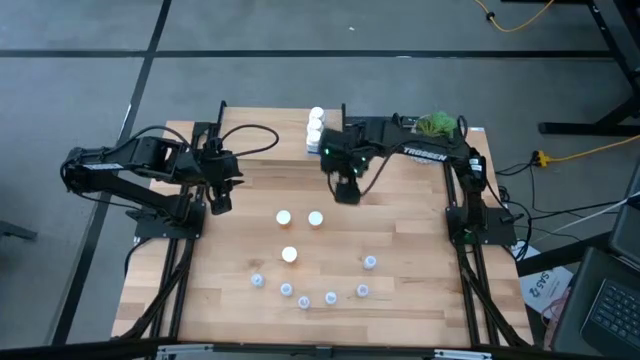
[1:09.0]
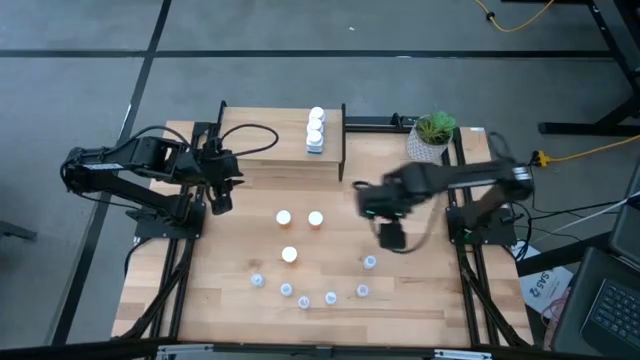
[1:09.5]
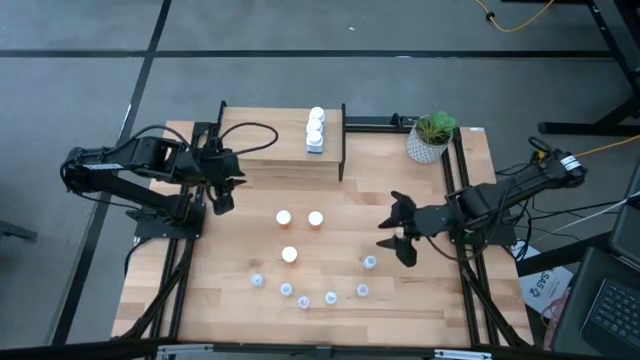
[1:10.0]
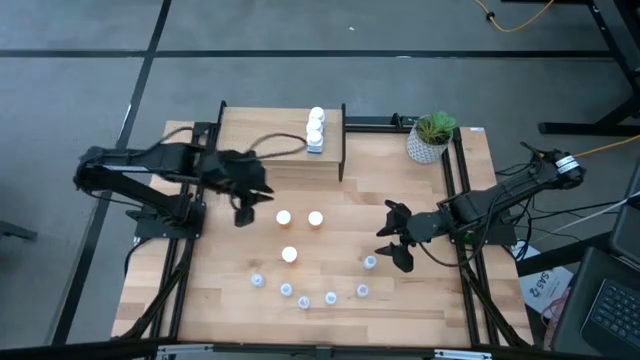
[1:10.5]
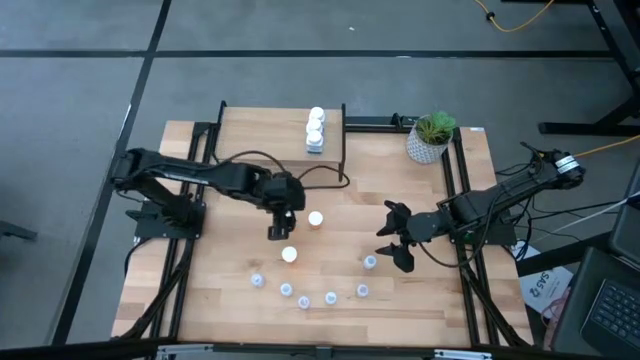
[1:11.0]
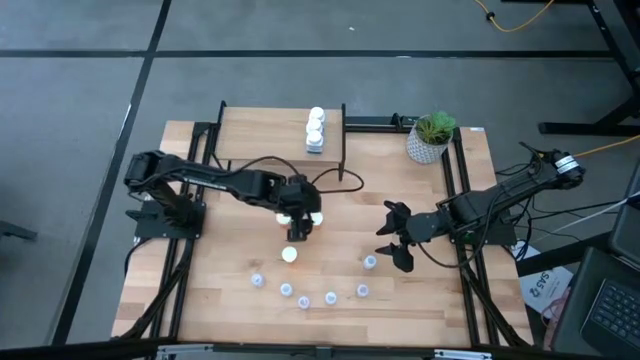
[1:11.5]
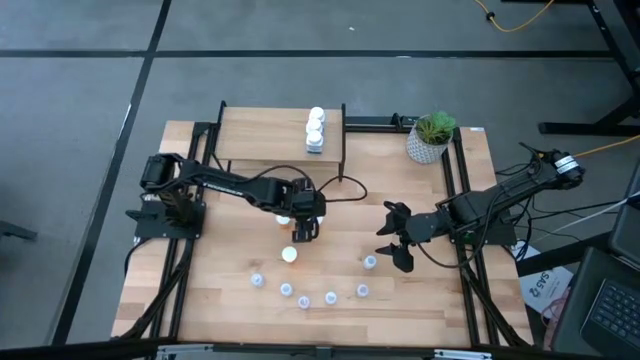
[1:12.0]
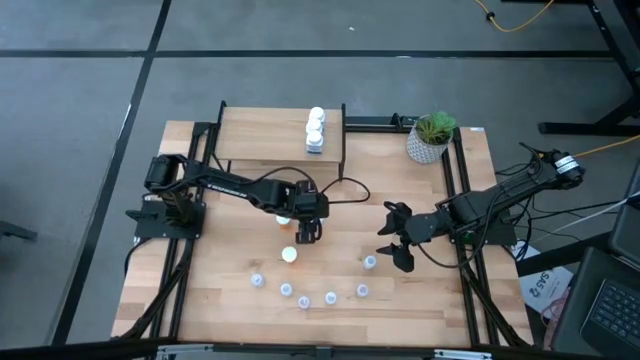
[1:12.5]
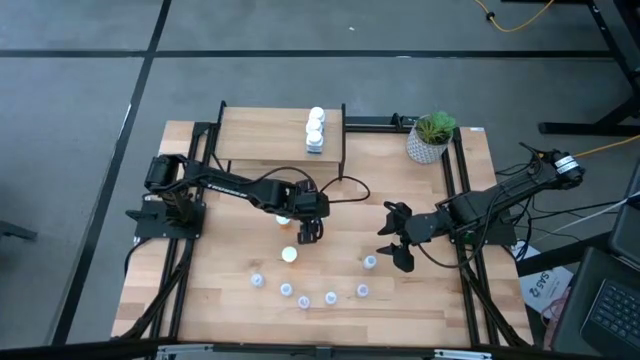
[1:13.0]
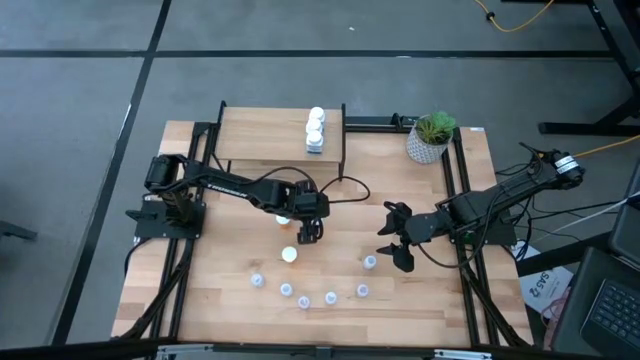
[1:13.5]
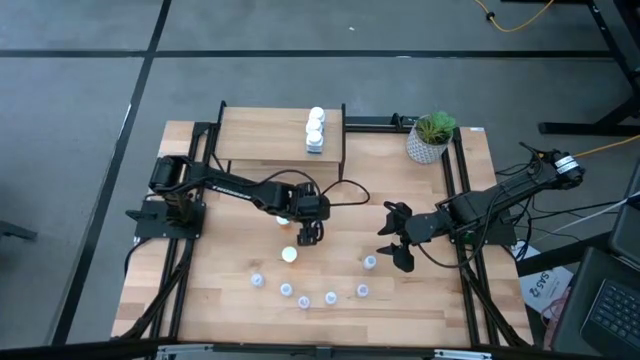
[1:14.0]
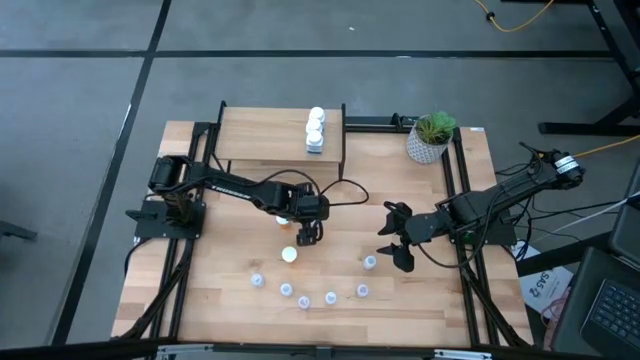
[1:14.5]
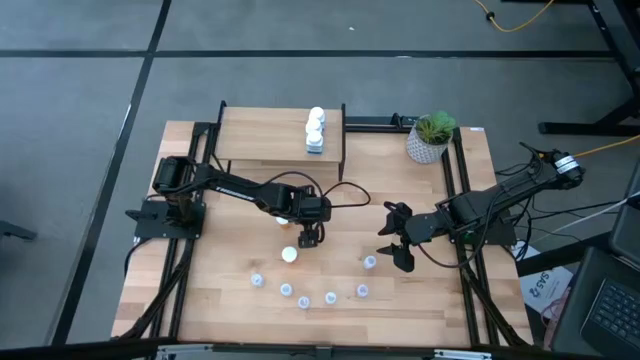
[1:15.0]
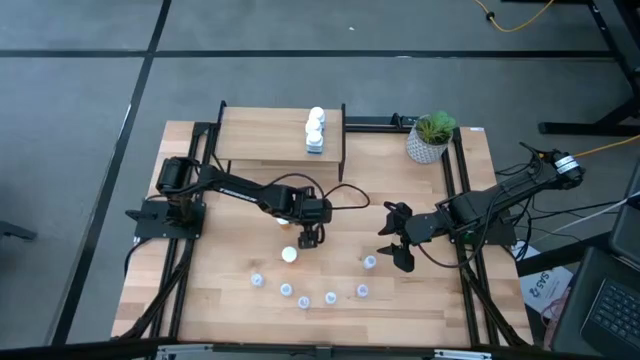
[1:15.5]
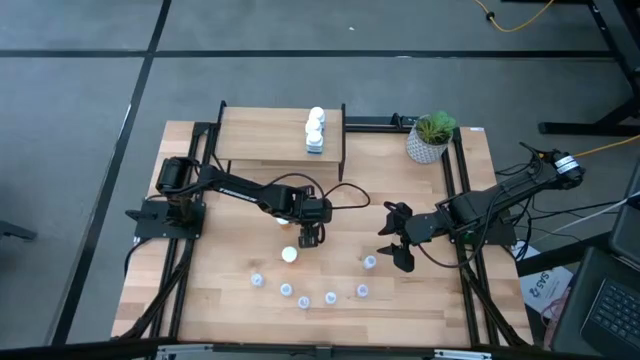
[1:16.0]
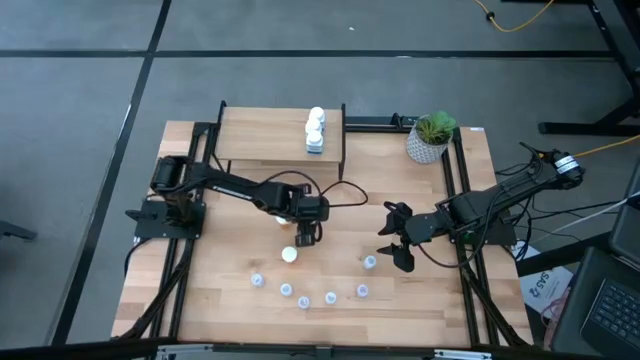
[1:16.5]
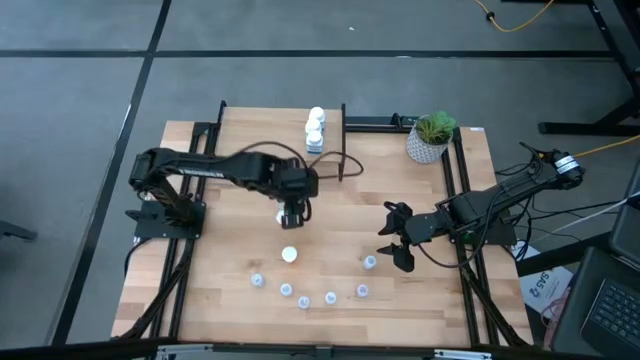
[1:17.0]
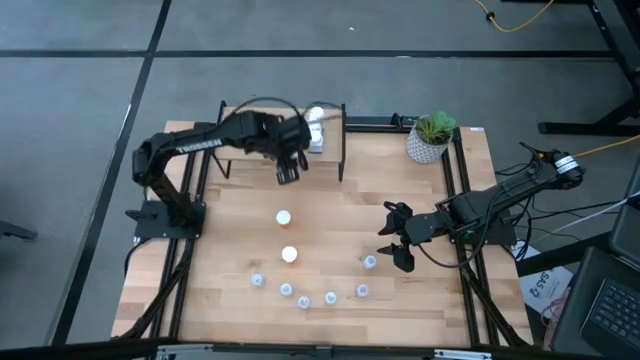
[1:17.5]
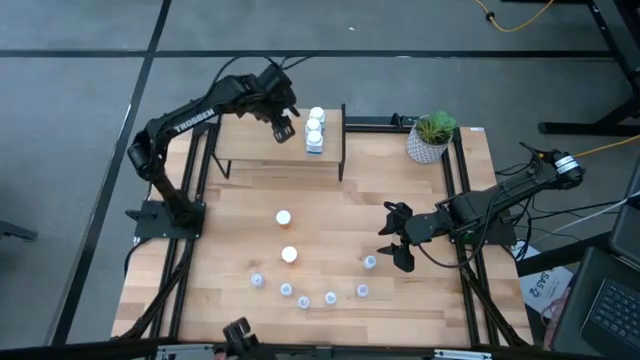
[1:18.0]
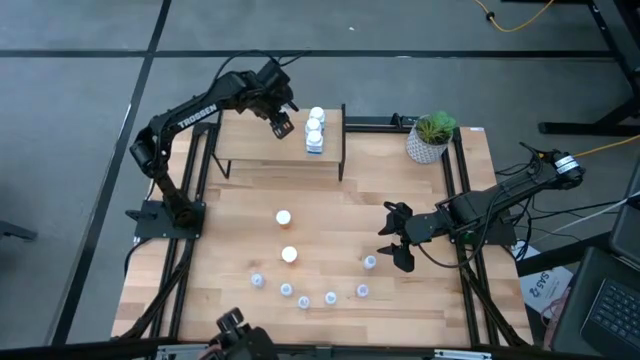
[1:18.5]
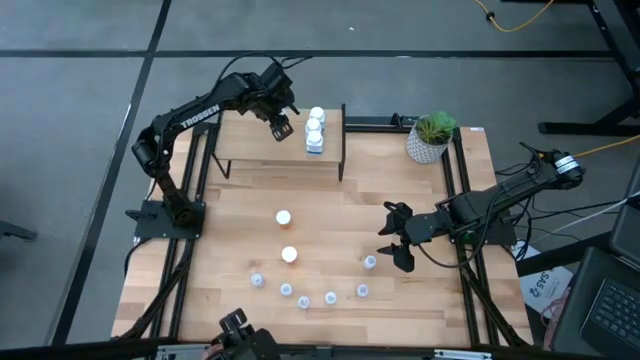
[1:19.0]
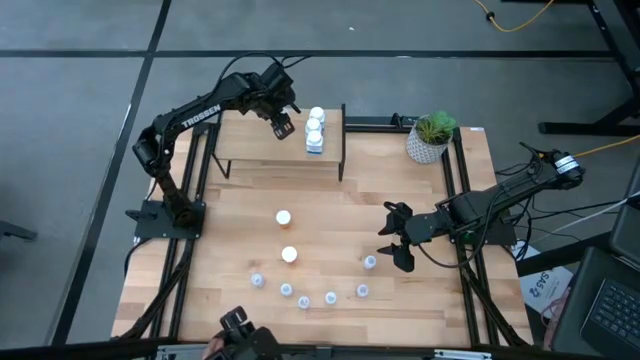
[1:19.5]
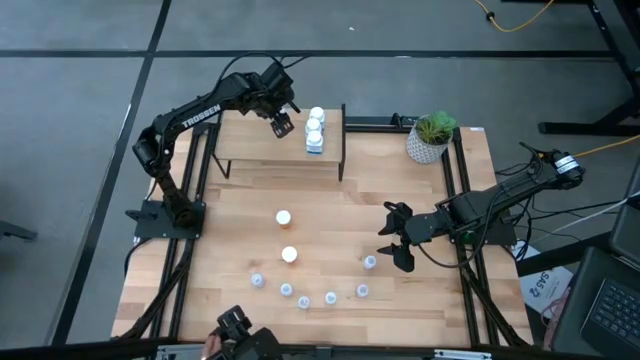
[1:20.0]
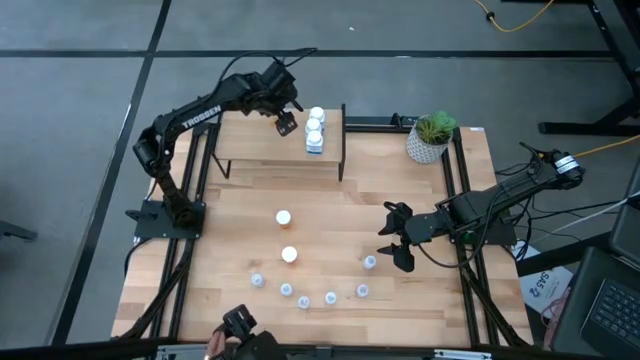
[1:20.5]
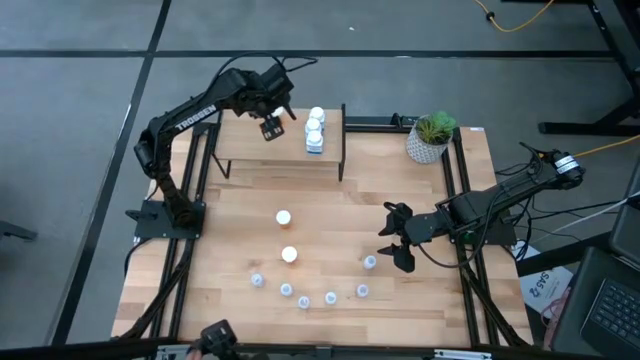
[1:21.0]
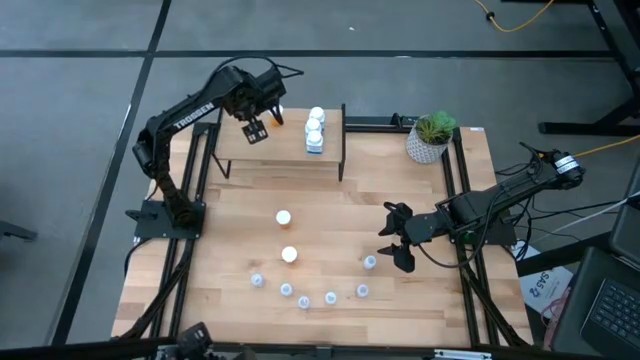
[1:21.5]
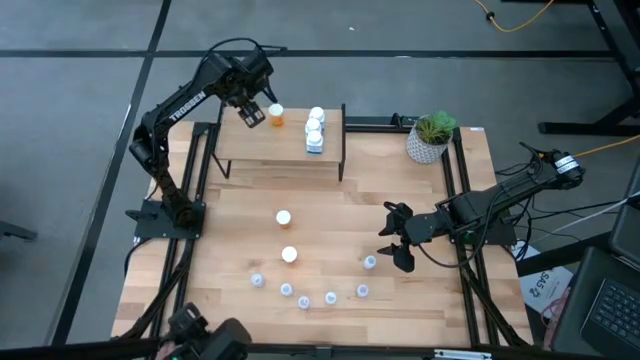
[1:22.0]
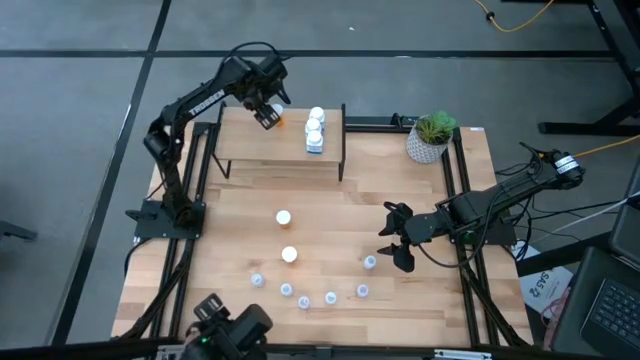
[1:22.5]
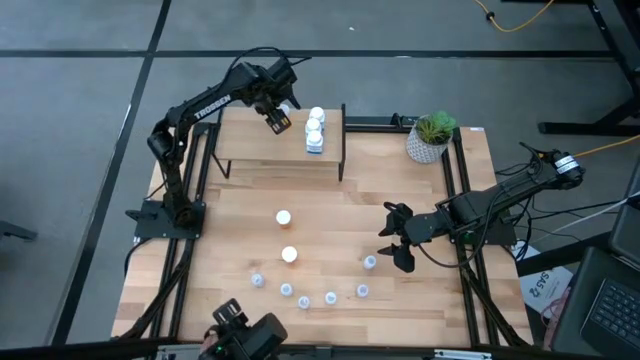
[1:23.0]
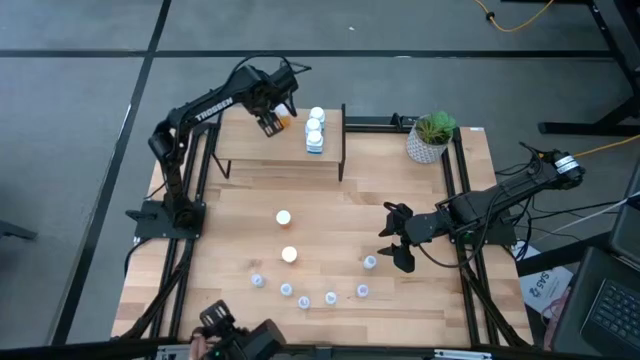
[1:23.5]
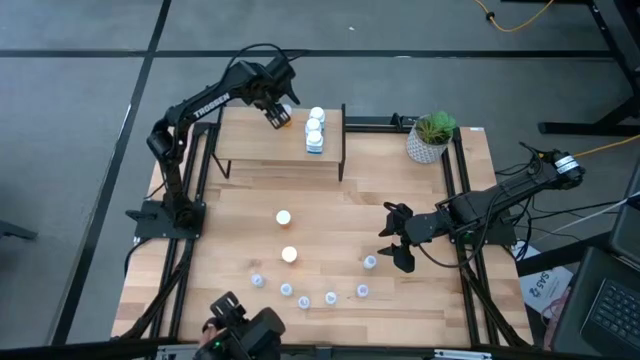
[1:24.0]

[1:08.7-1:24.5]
Task: Pick and place medicine bottles onto shelf by color
Put the top right orange pill bottle on the shelf

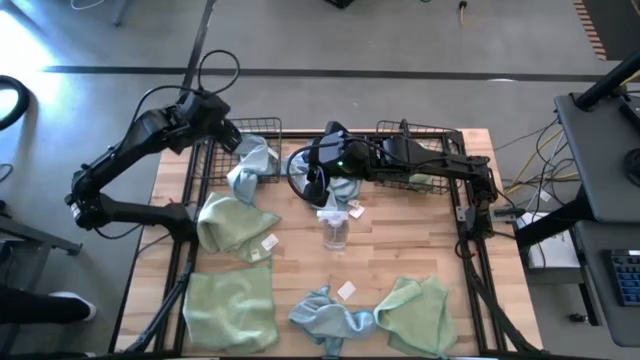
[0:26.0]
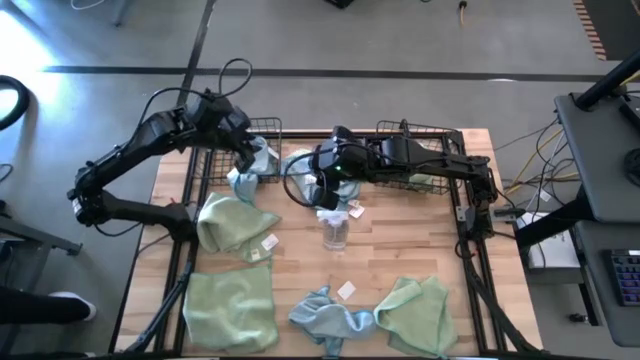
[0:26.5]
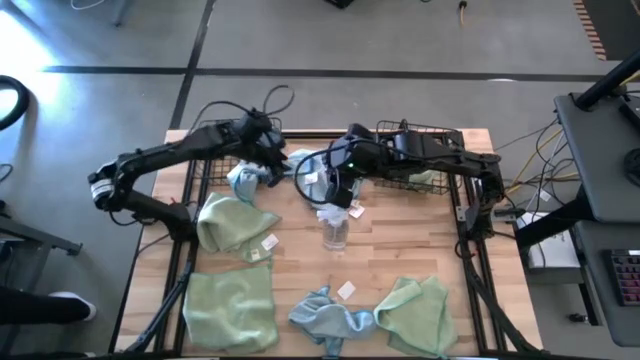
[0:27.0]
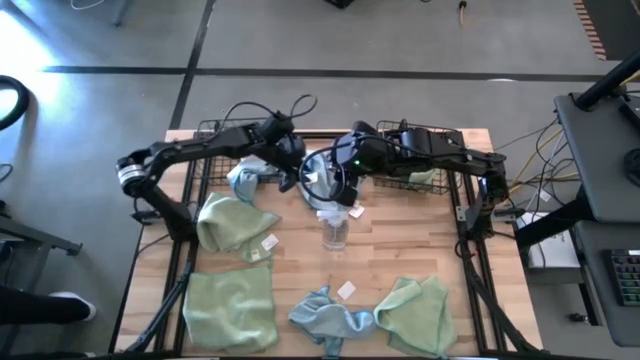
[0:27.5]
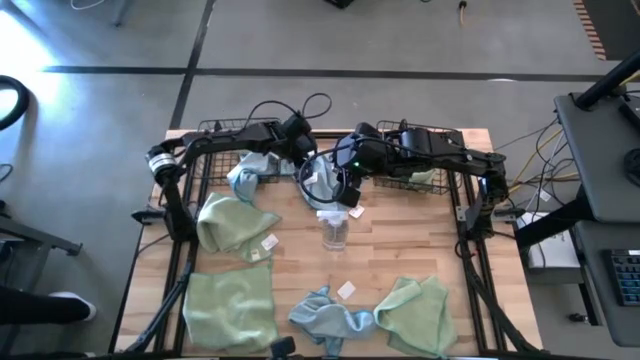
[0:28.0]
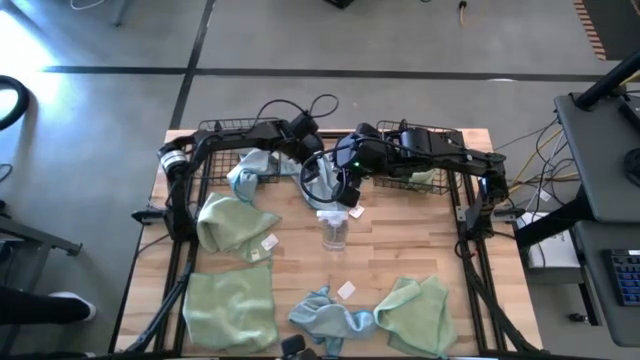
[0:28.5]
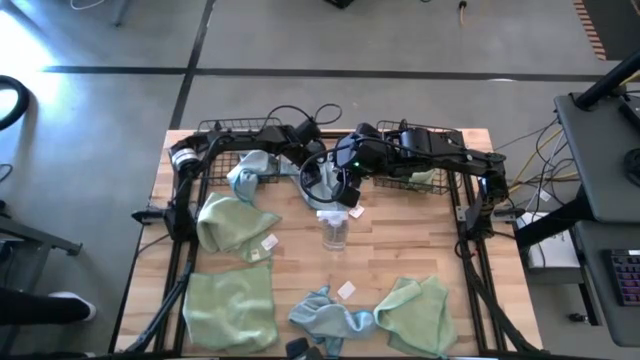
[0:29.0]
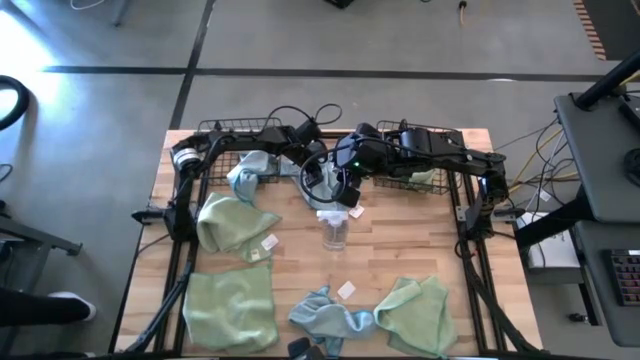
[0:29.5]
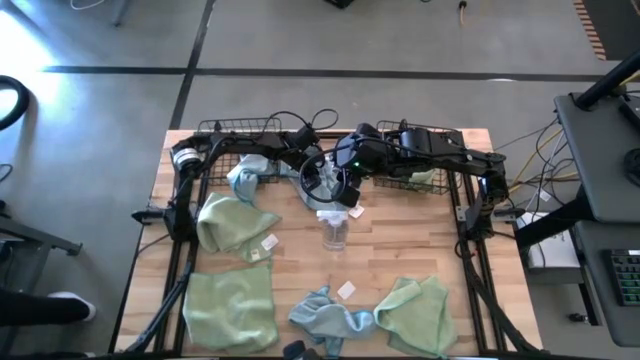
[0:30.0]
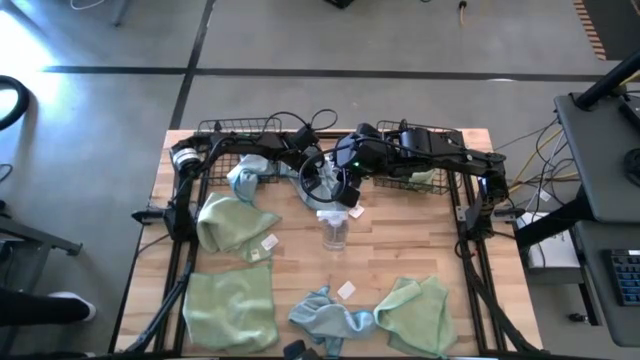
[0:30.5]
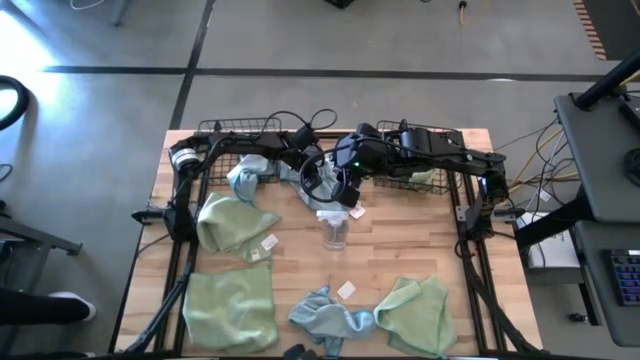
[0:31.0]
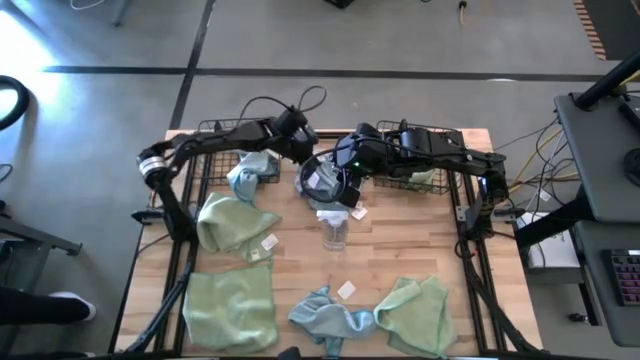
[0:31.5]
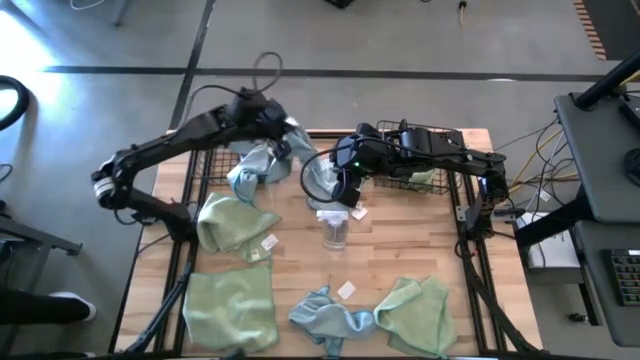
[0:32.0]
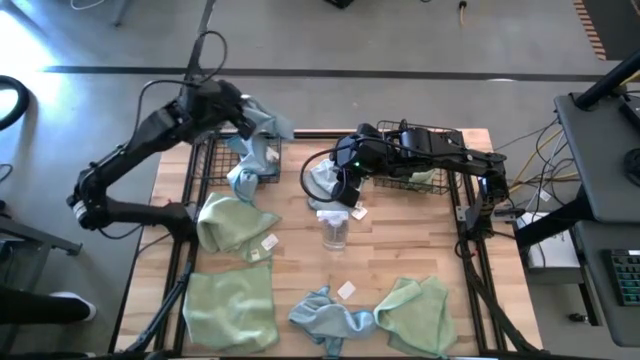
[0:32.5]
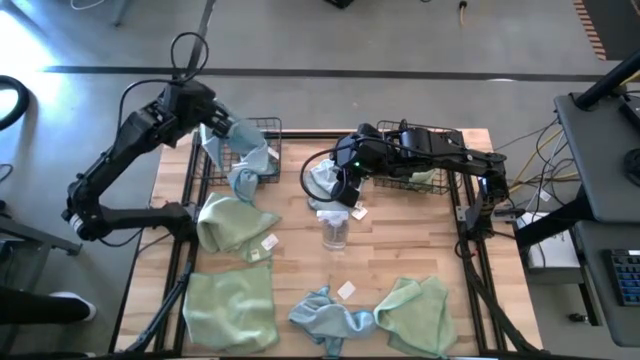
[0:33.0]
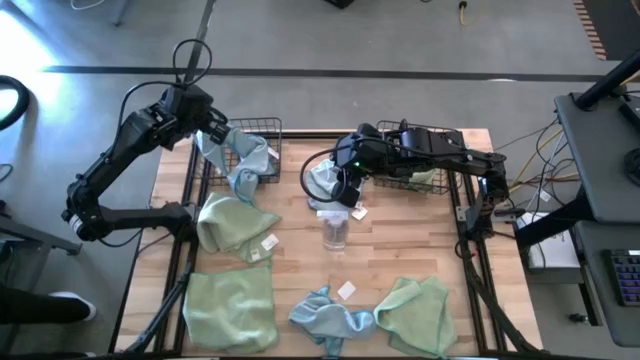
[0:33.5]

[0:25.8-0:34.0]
Task: Sort microfiber towel by color & place in baskets
Put the blue towel into the left wire basket
